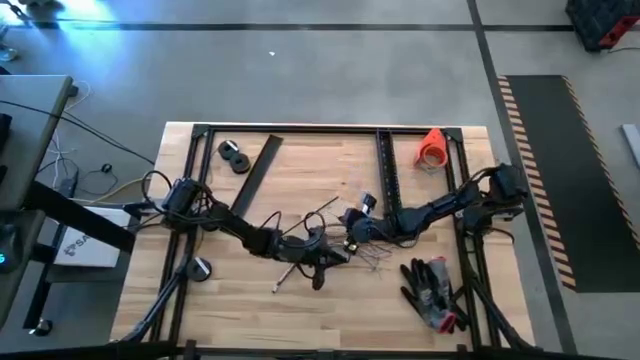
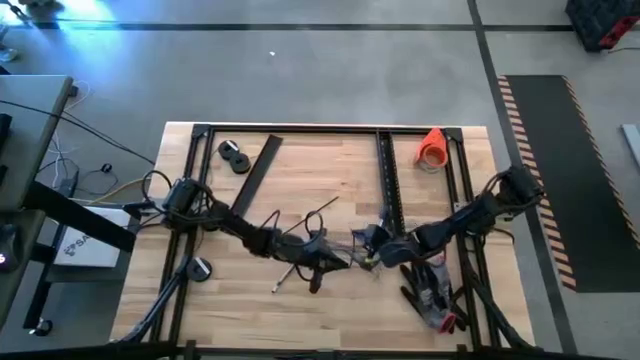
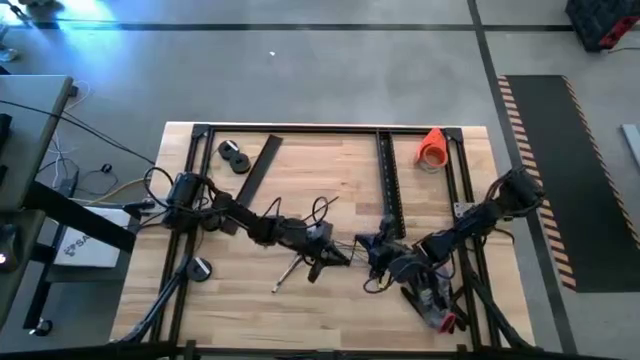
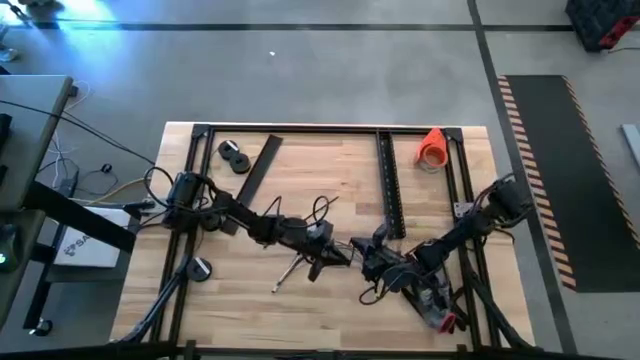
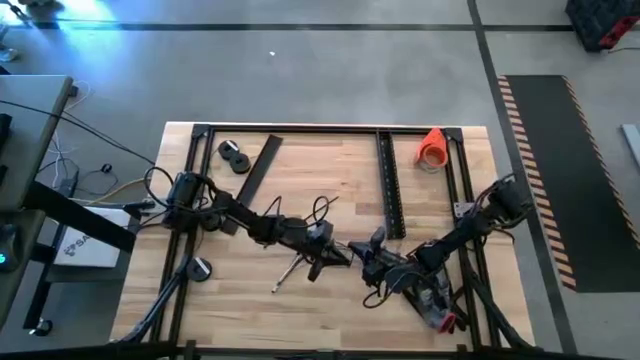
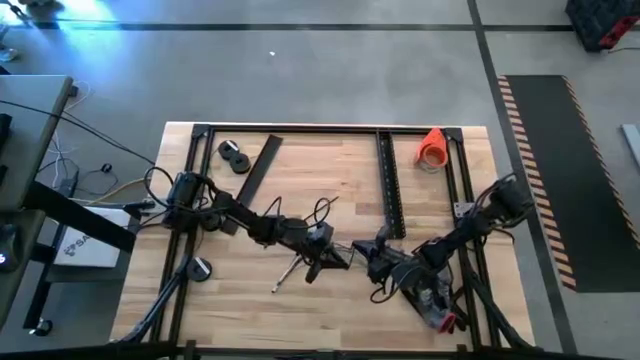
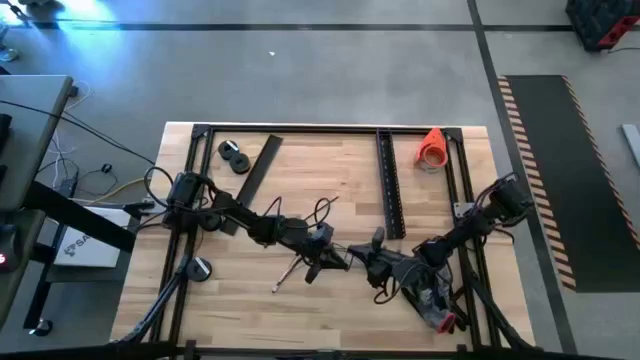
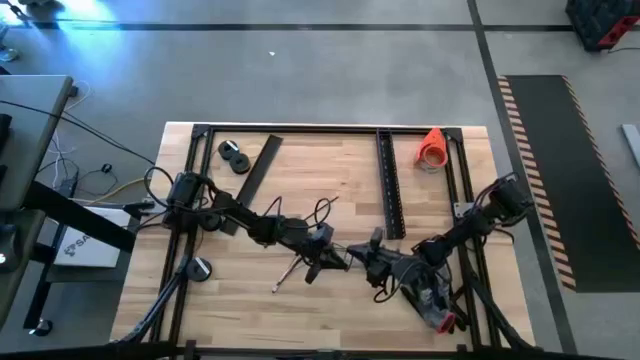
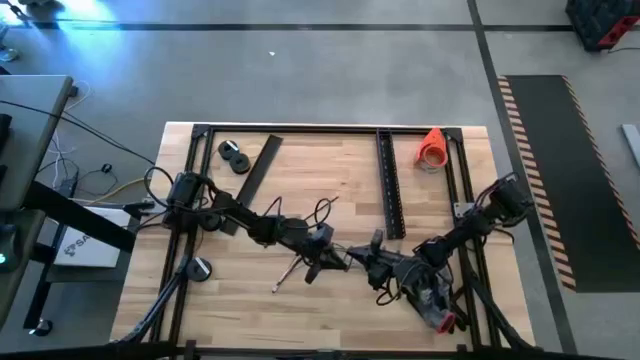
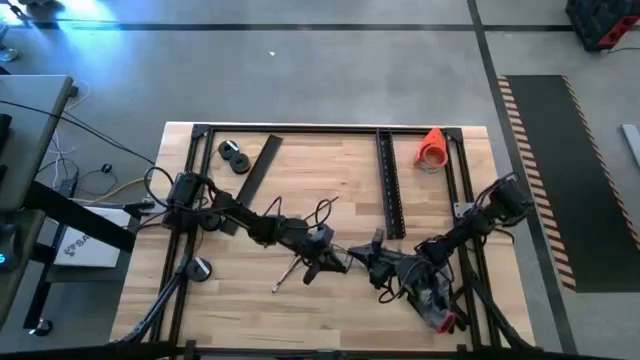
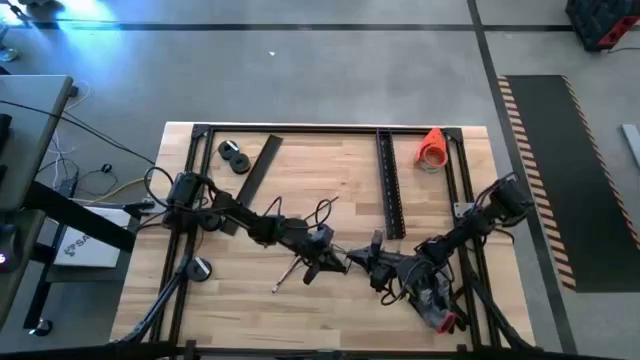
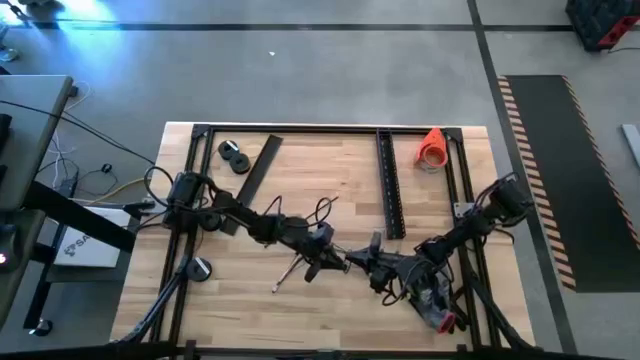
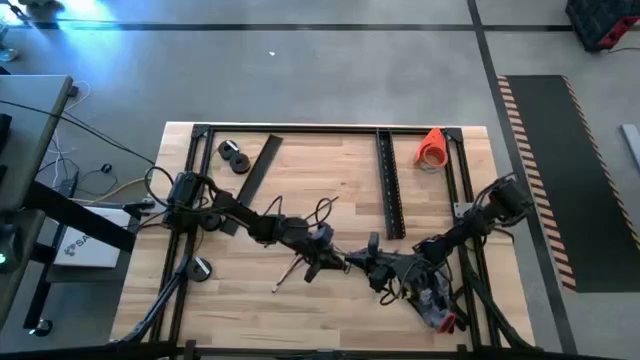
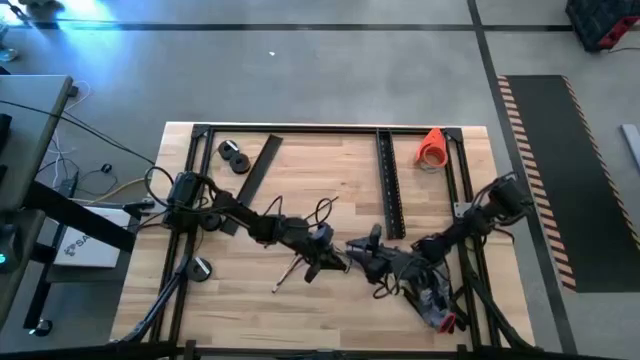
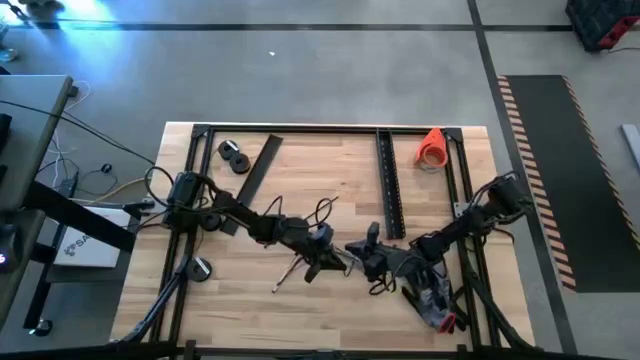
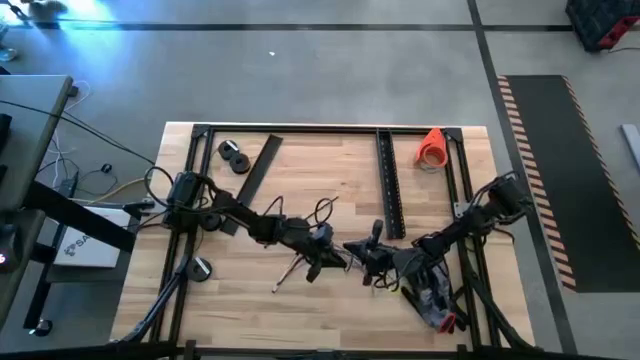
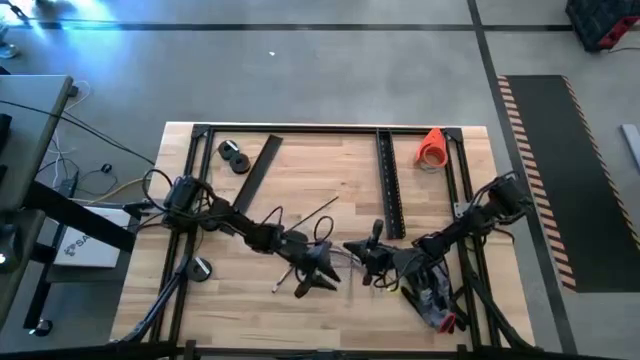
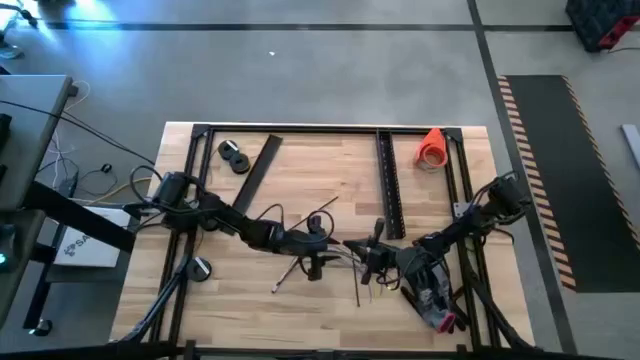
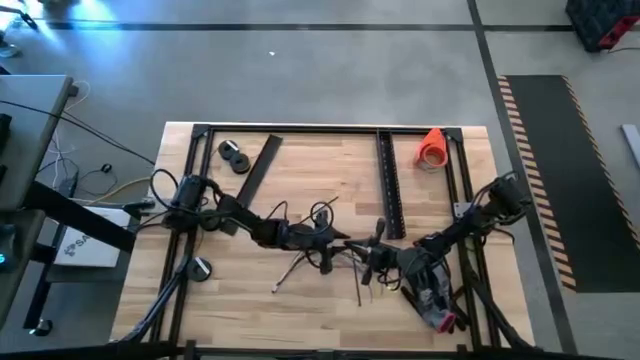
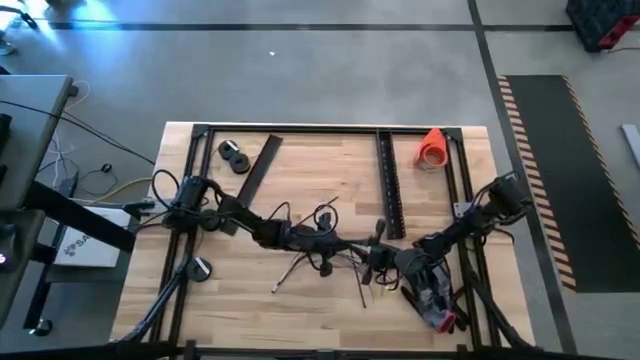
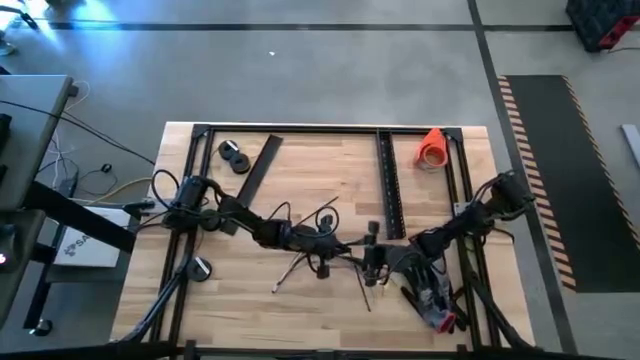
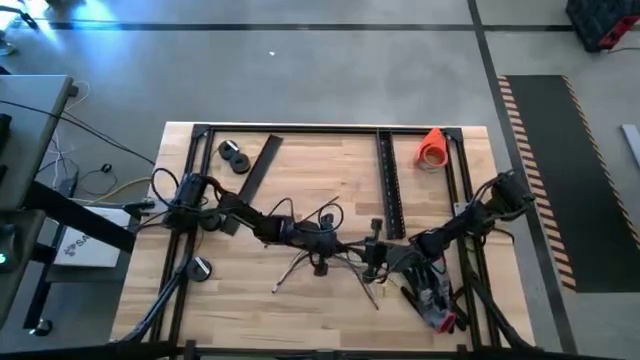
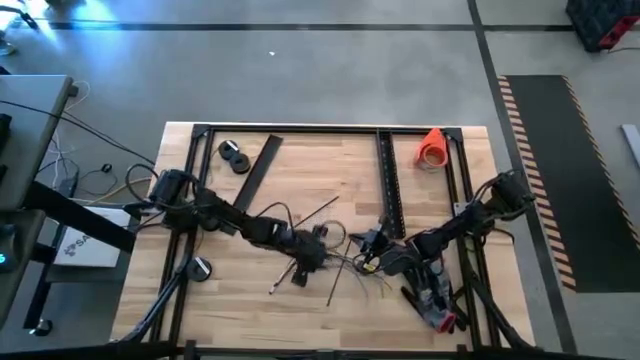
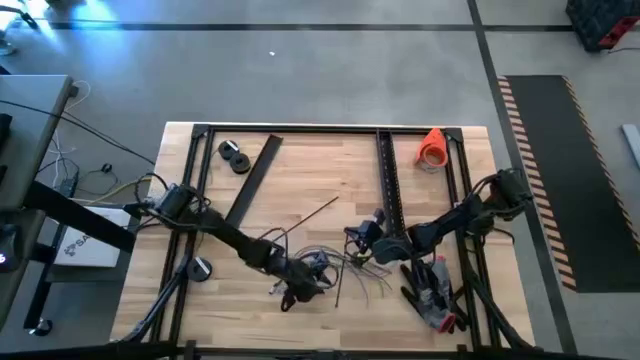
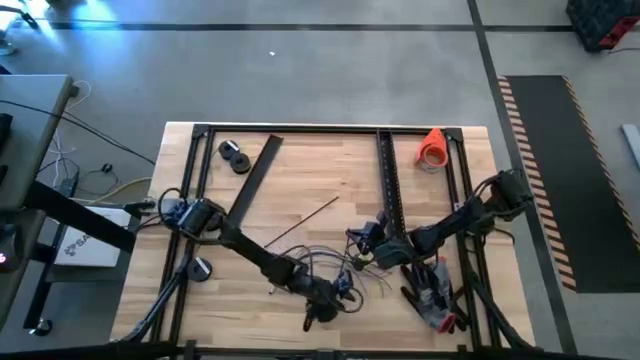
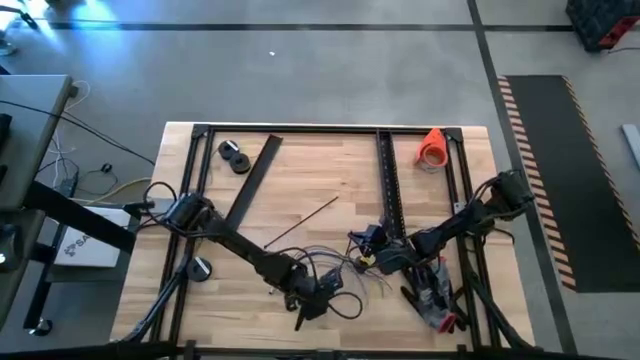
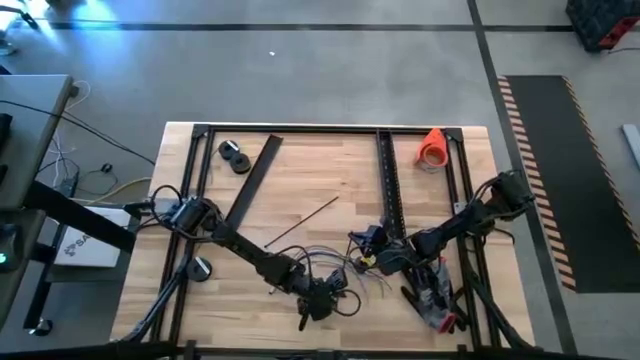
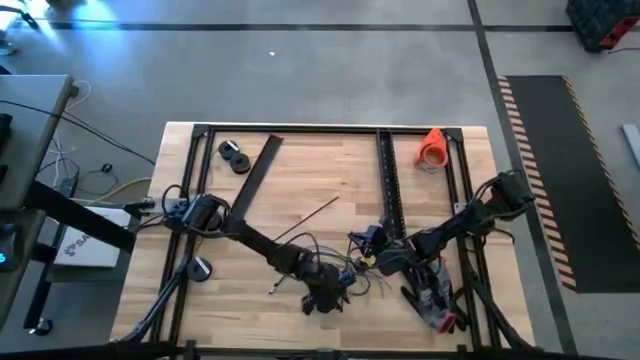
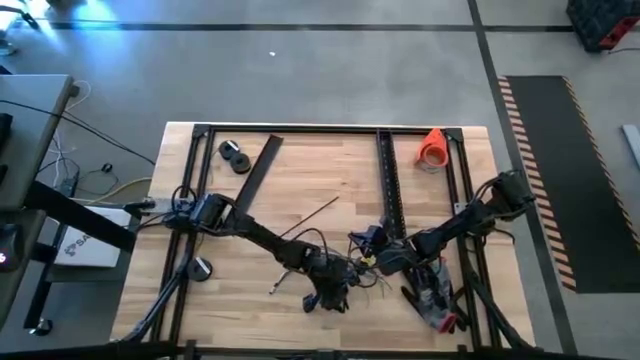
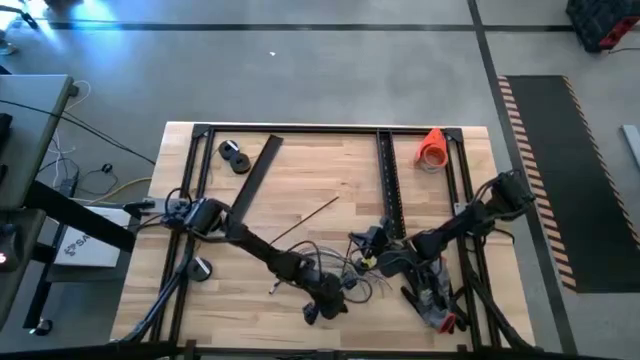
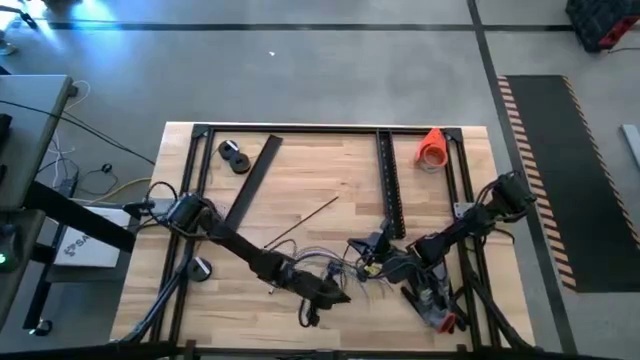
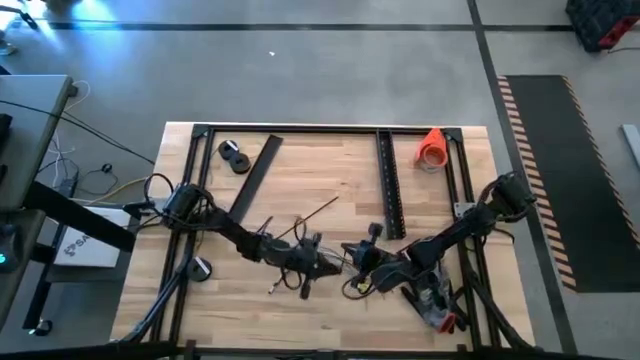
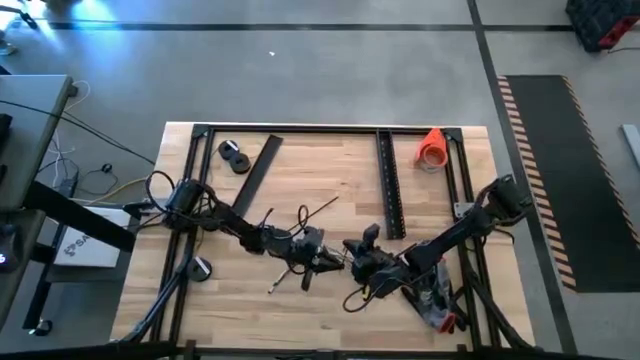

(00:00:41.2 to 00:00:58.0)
Task: Ziptie cables
Wrap the left black zip tie on the cables

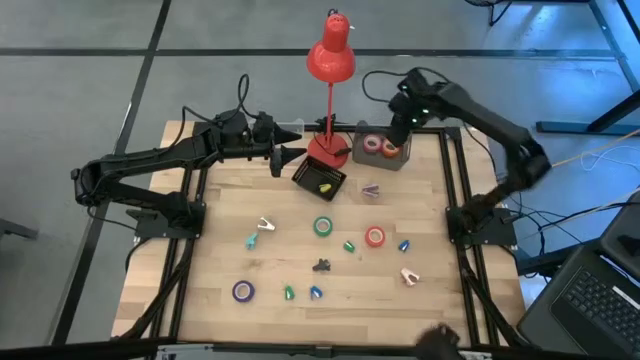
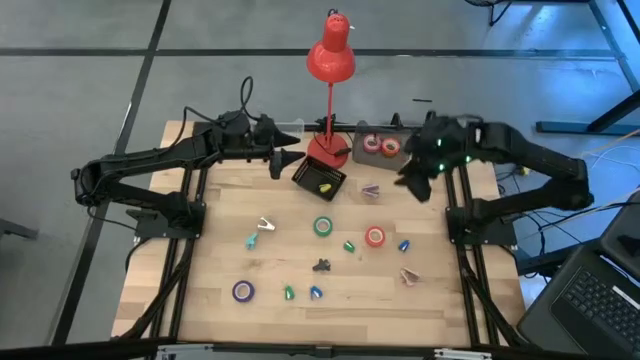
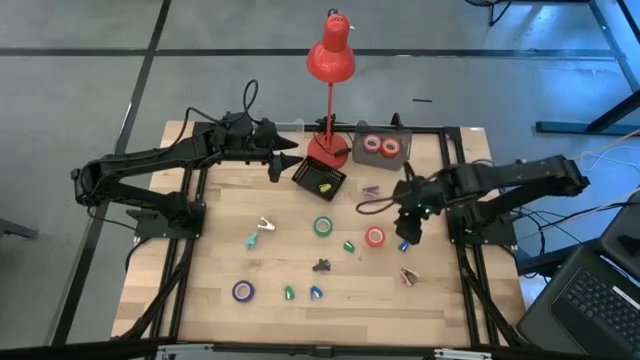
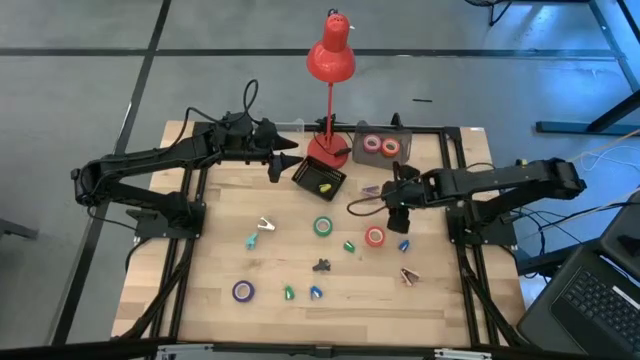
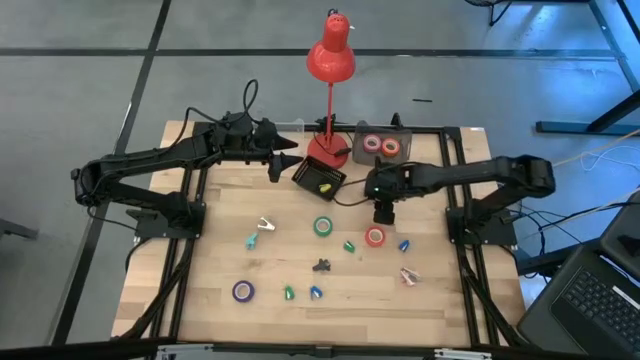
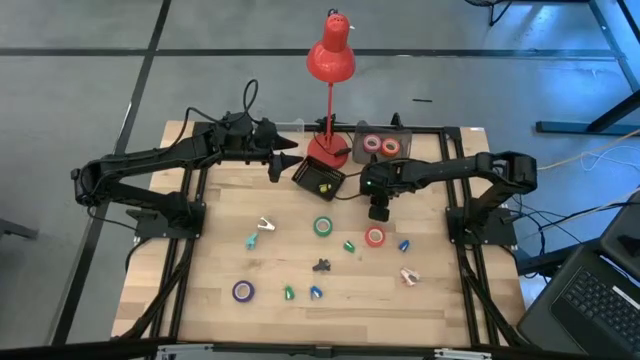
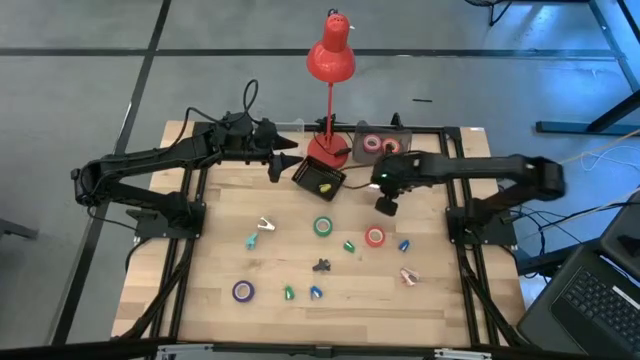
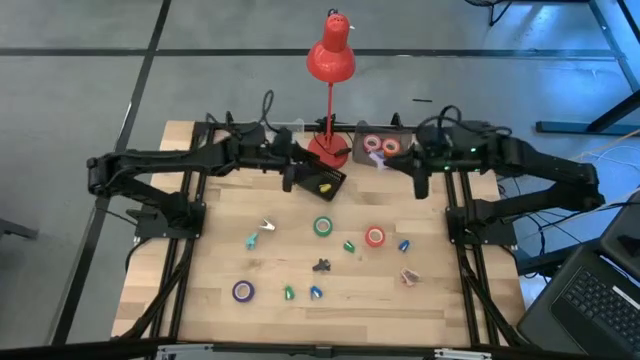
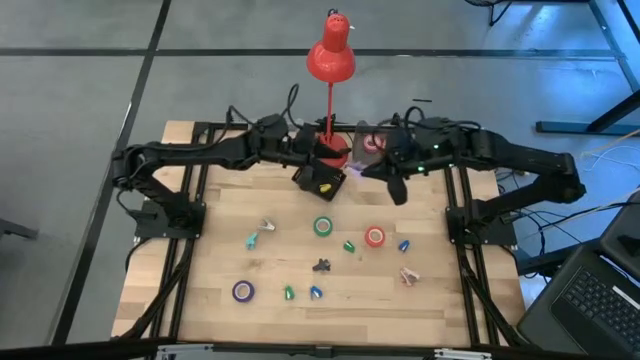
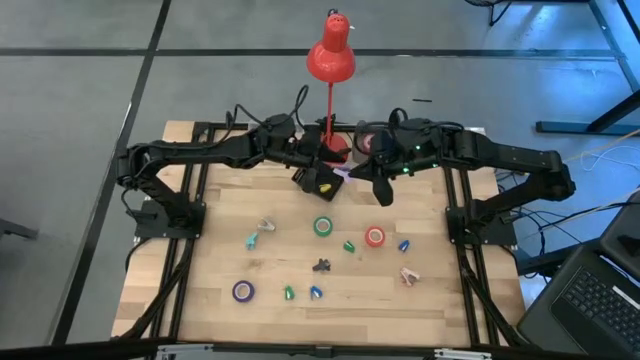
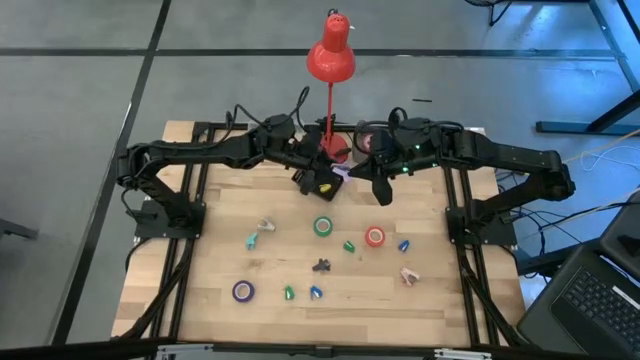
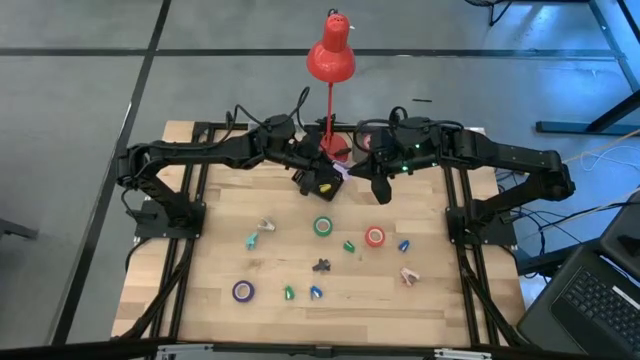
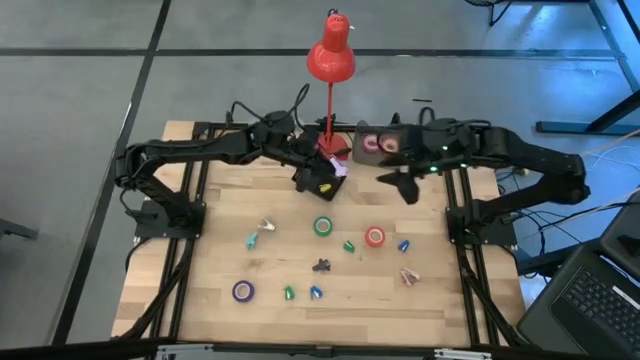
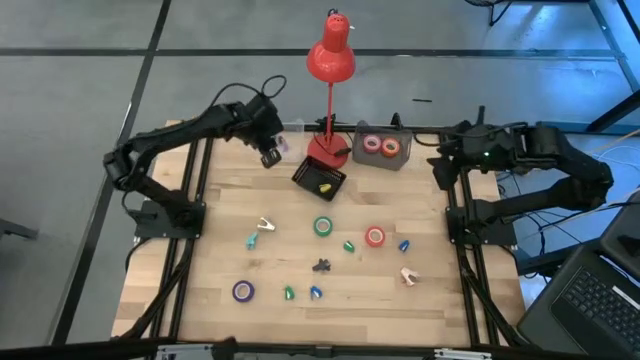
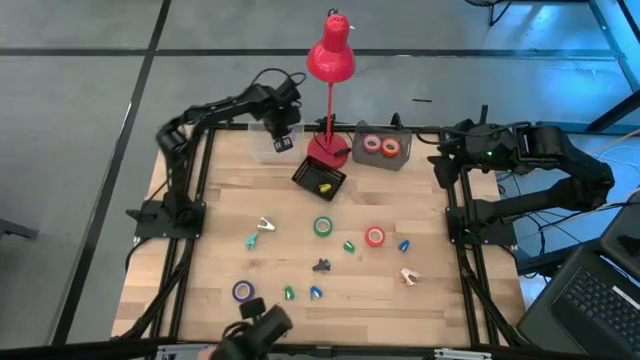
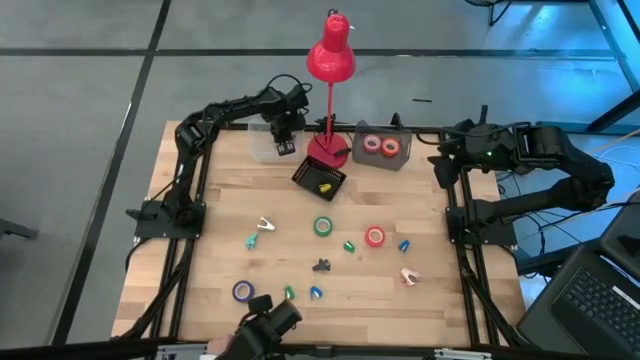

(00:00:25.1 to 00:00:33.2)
Task: Pick and place Stapler, Stapler remover, tape
Put the purple staple remover into the transparent bin
